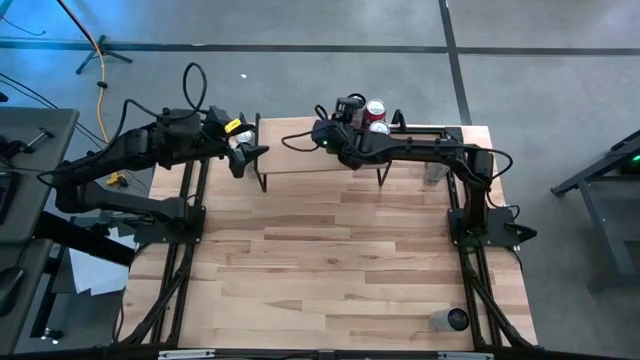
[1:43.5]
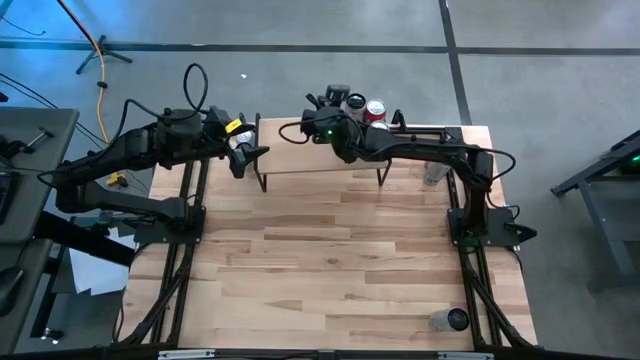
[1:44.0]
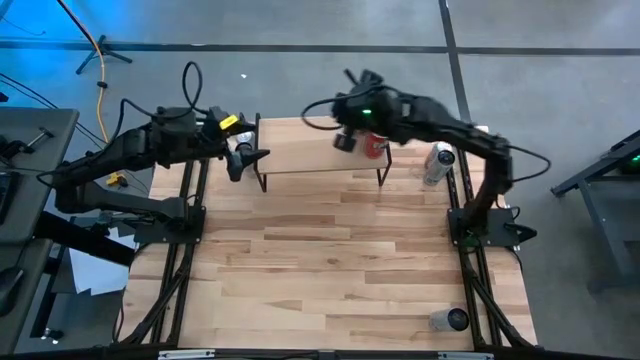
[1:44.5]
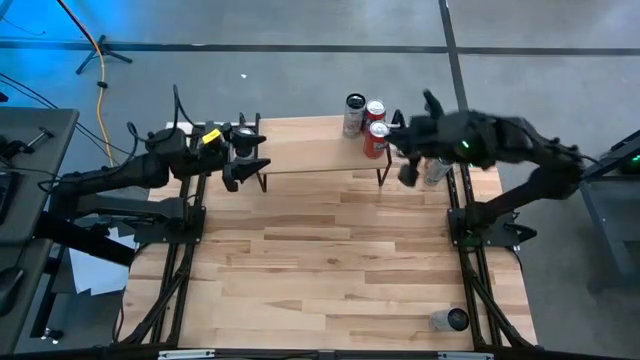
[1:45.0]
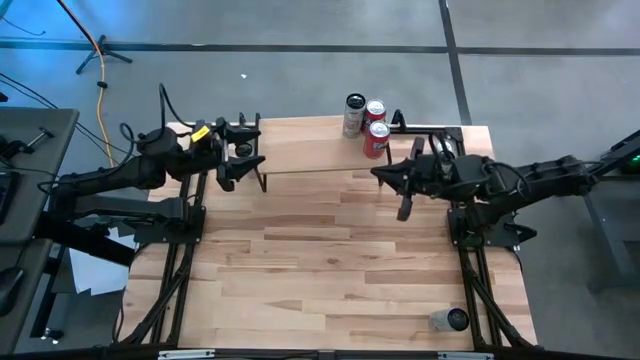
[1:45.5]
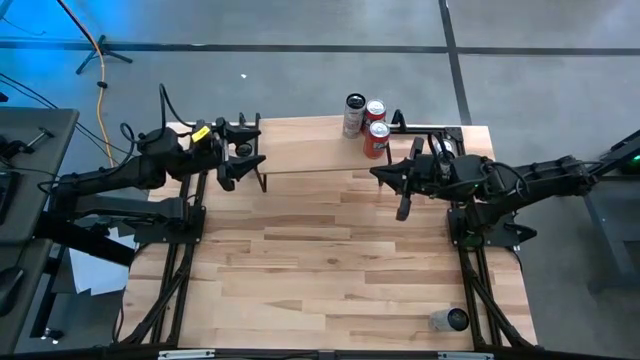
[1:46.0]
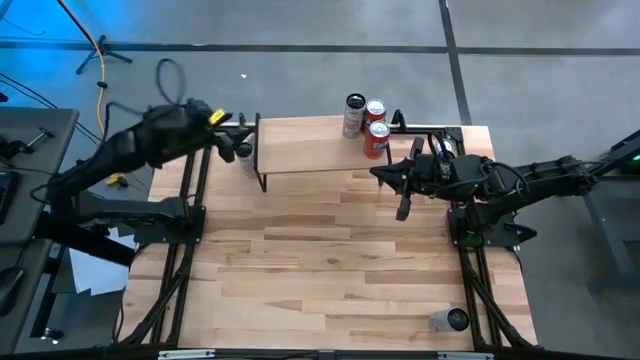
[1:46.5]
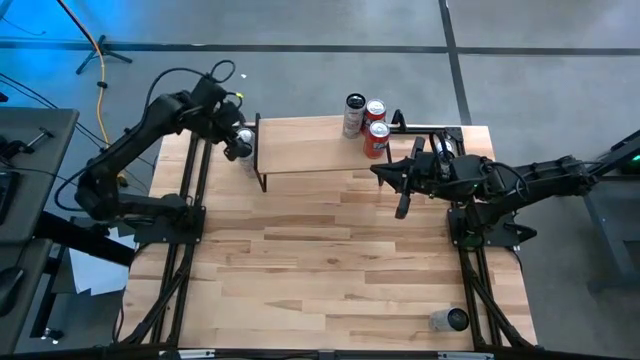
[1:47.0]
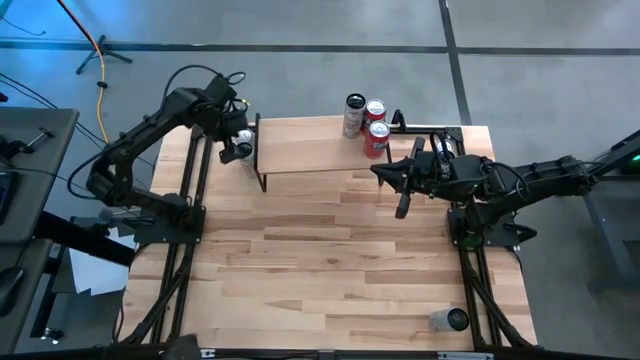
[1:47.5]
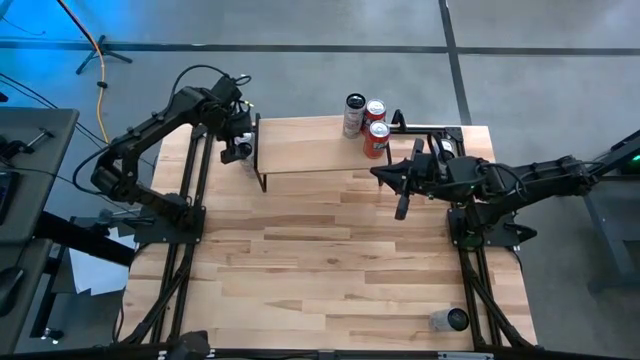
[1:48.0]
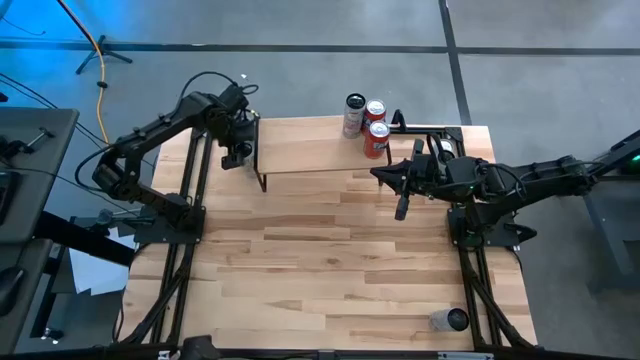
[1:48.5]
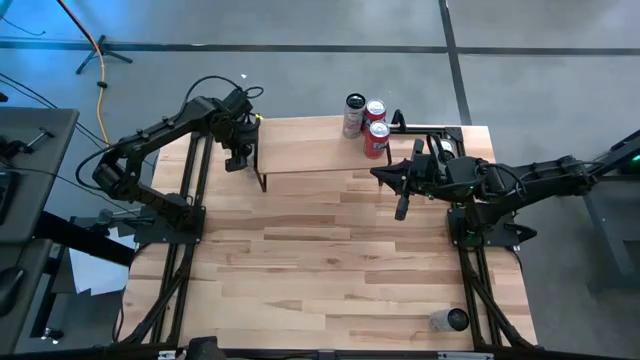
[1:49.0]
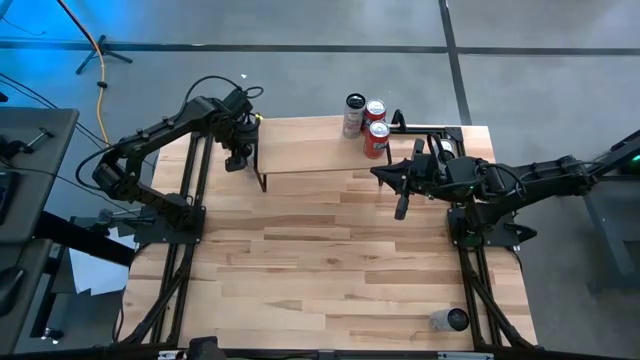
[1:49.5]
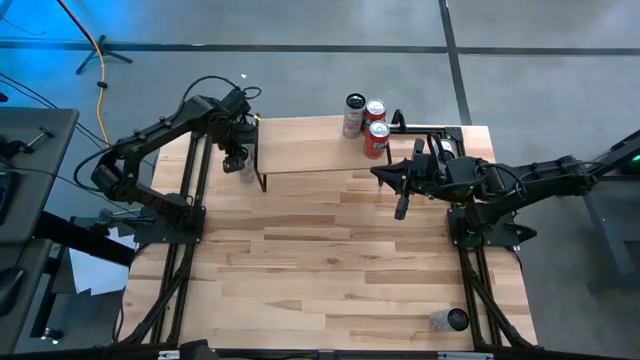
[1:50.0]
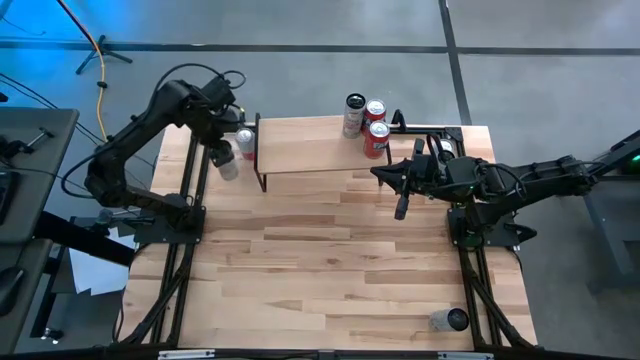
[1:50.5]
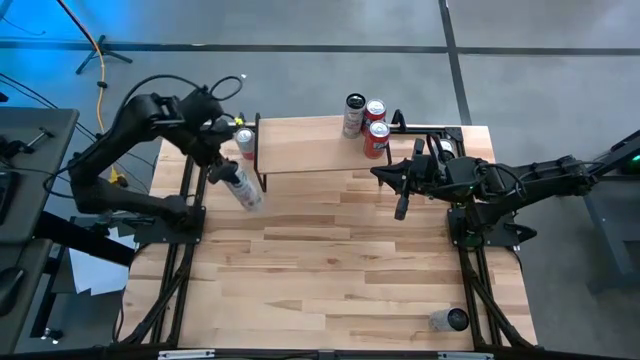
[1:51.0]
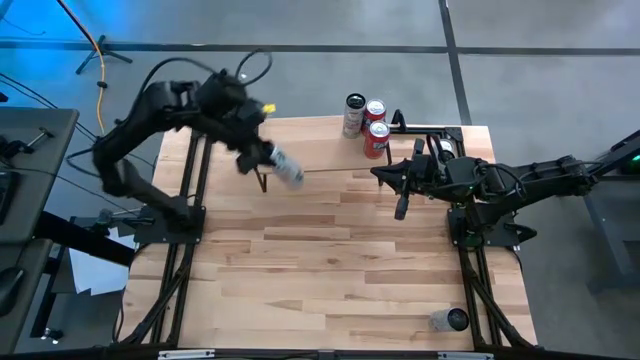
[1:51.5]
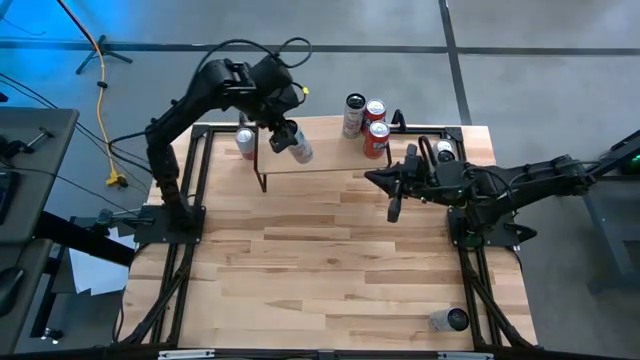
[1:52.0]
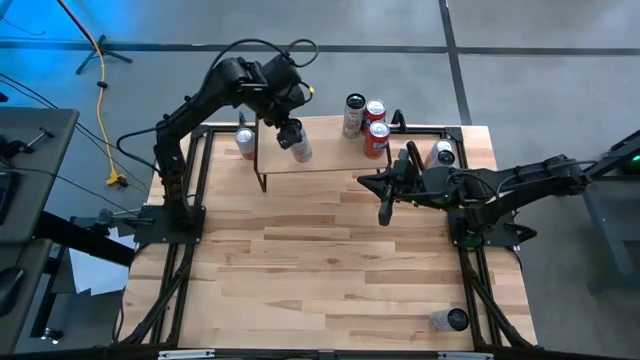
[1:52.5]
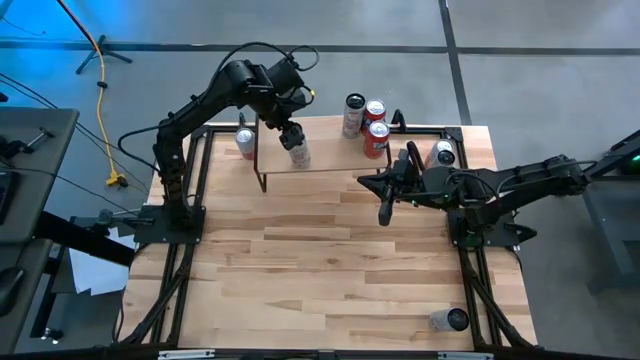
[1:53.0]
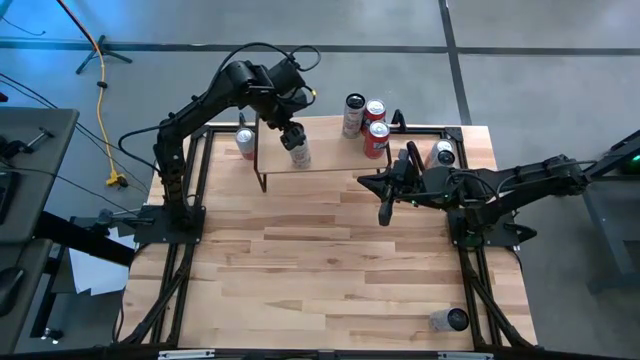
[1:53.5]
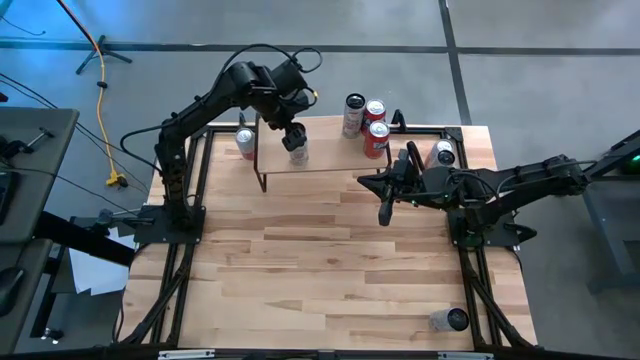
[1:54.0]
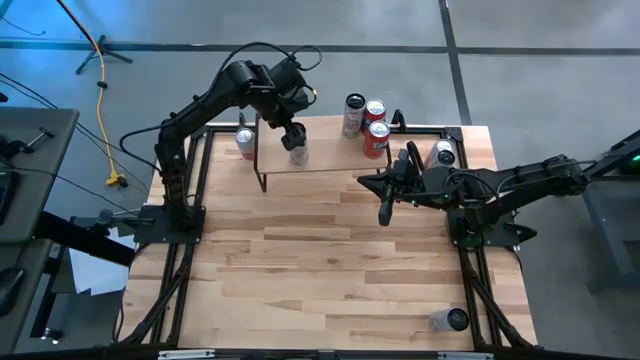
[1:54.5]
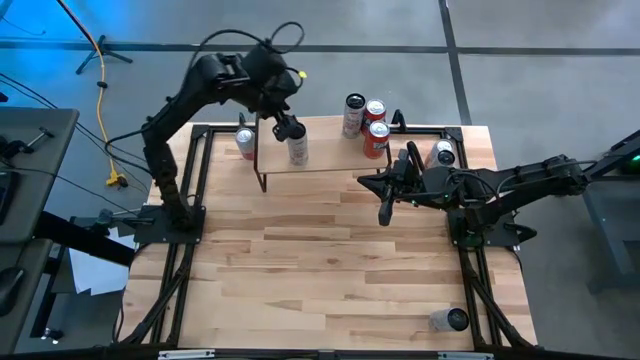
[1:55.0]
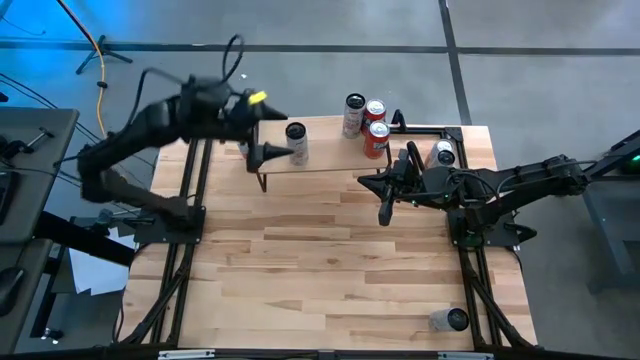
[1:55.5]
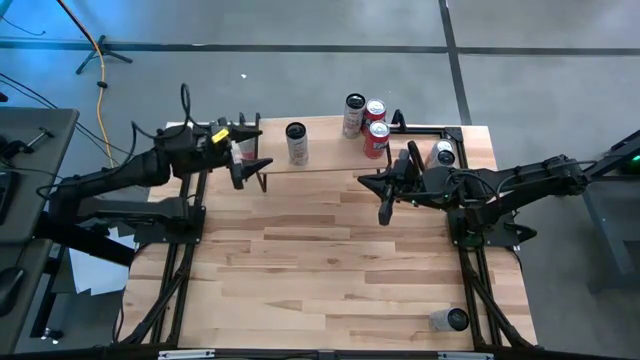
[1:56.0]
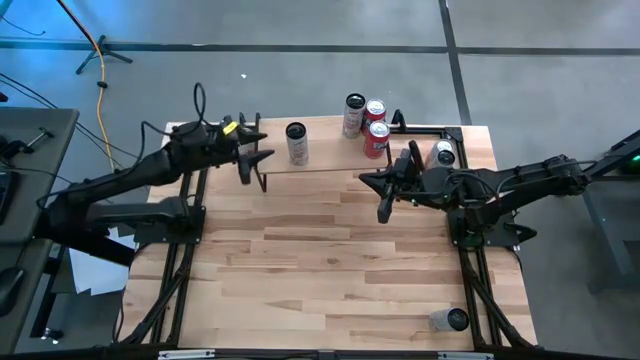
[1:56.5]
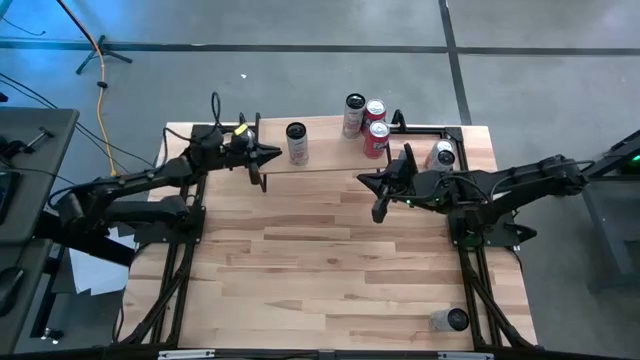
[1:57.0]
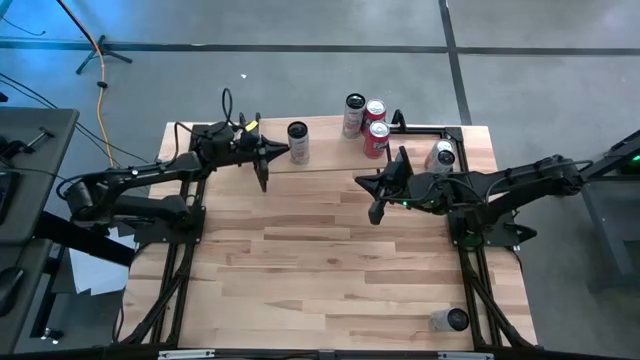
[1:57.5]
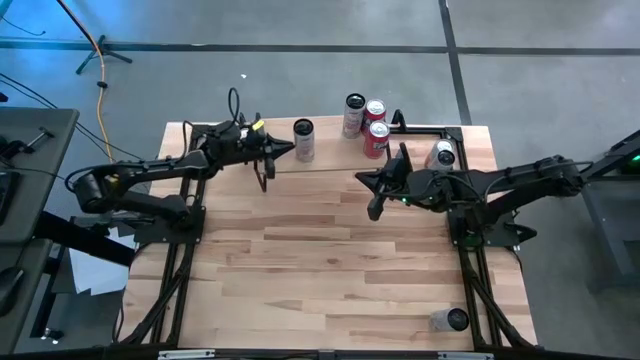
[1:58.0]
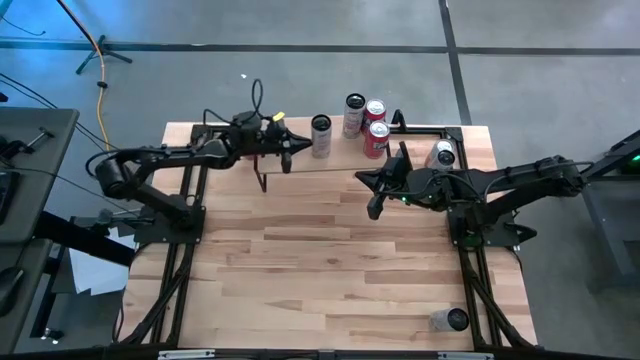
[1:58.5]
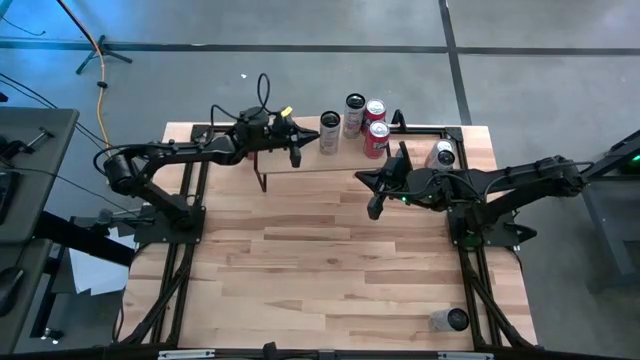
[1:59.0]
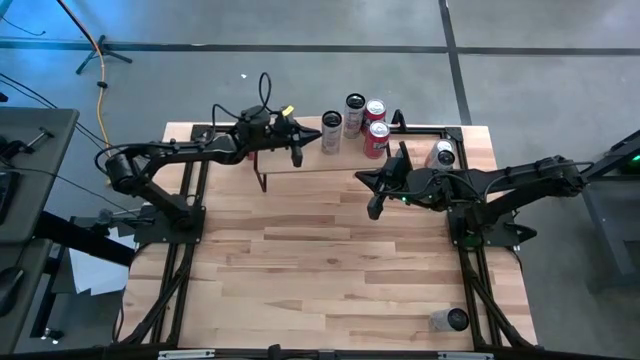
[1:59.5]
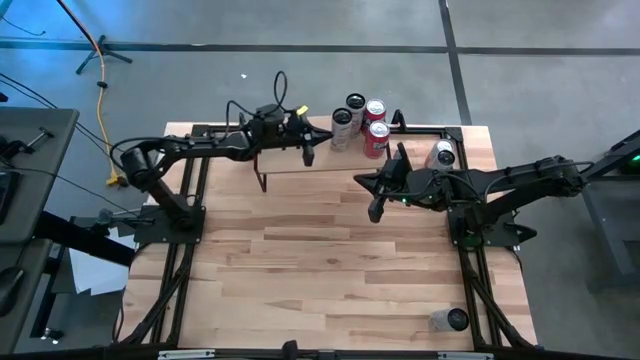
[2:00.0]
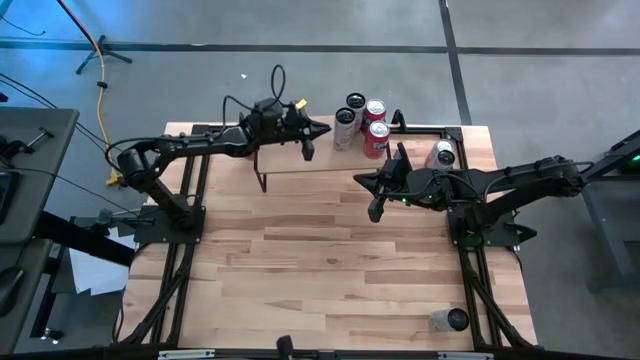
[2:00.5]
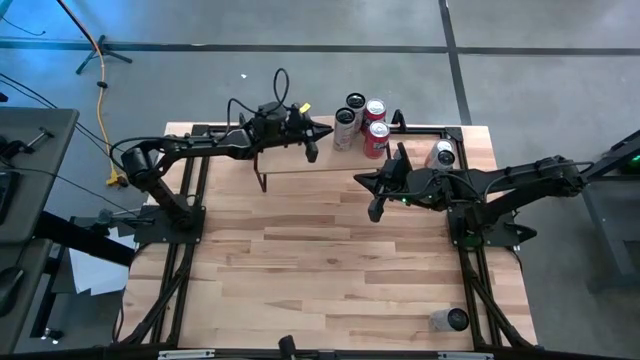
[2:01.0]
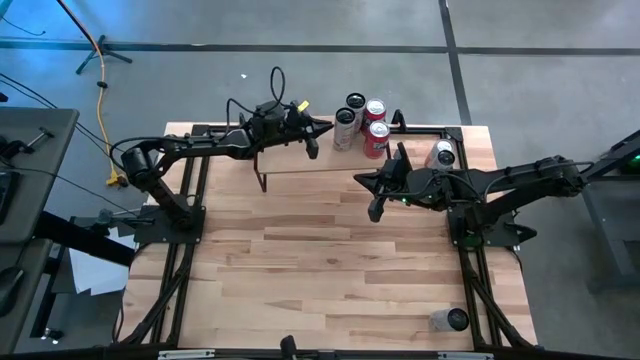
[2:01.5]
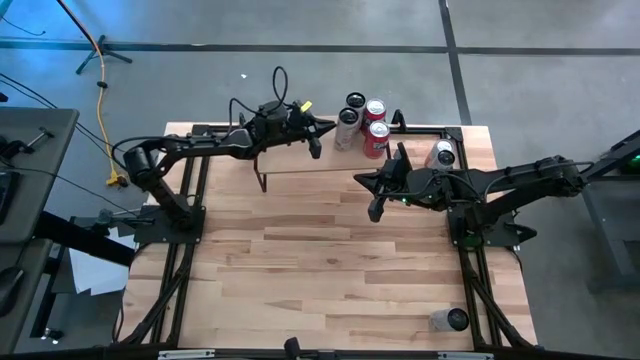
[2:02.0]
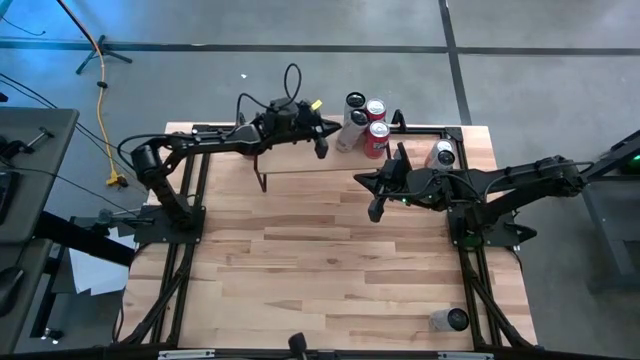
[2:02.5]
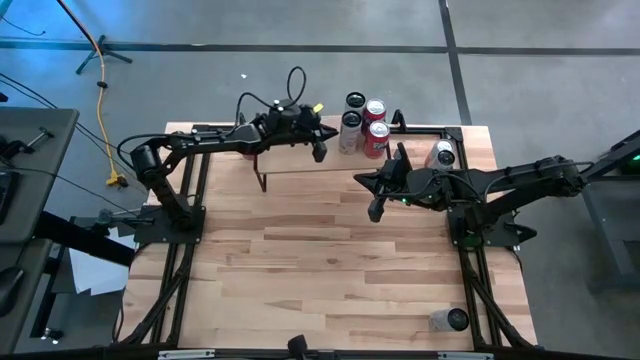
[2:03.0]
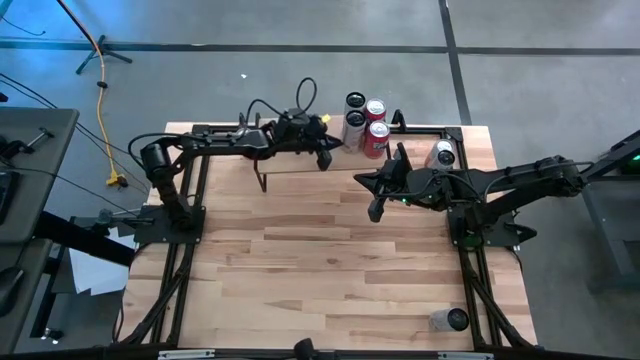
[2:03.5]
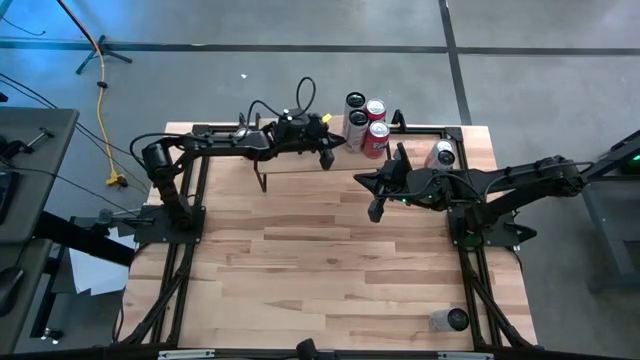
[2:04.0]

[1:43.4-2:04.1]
Task: Place canned beverage on shelf
Put the black orange soda can on the shelf
